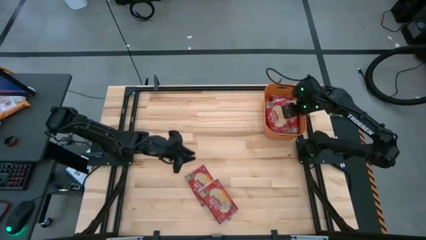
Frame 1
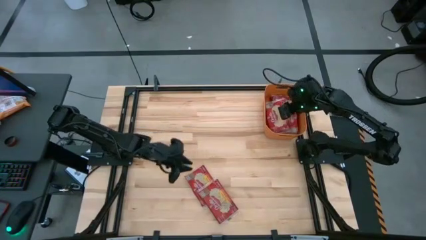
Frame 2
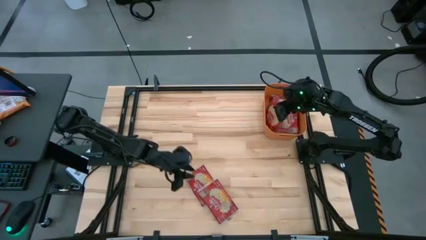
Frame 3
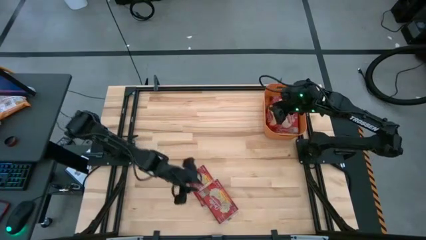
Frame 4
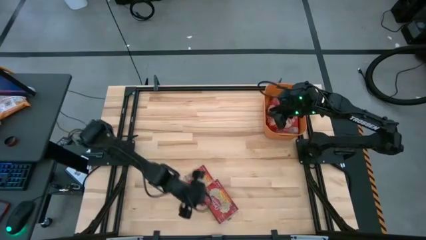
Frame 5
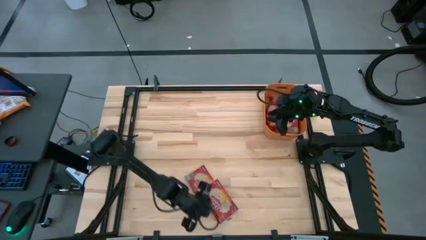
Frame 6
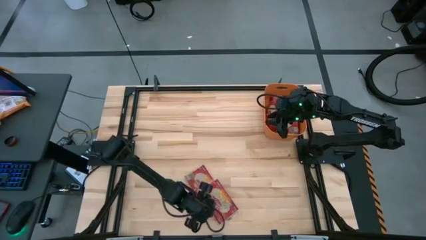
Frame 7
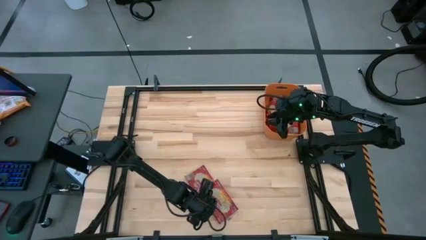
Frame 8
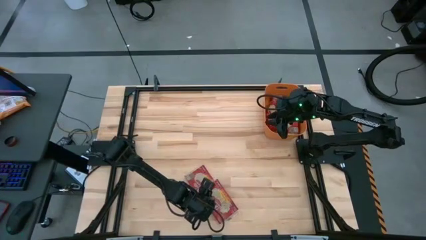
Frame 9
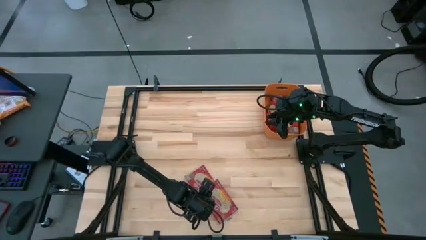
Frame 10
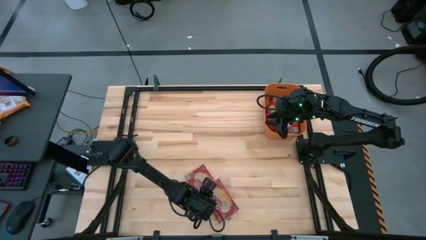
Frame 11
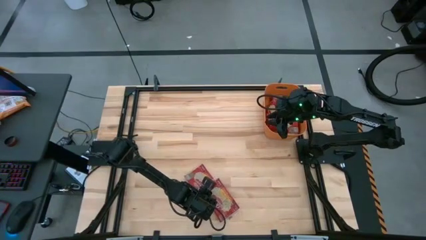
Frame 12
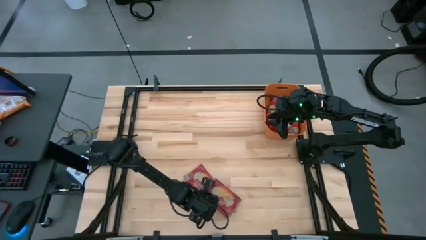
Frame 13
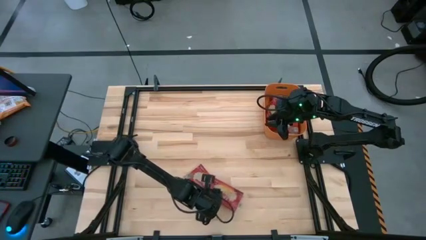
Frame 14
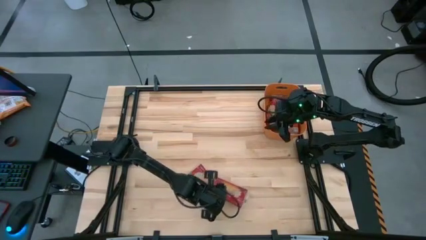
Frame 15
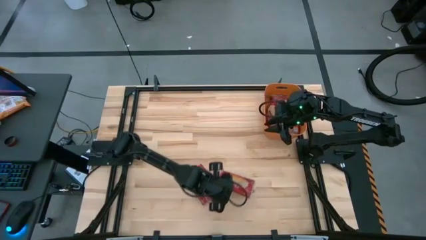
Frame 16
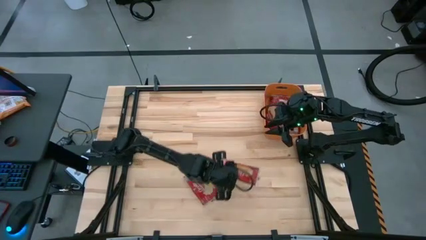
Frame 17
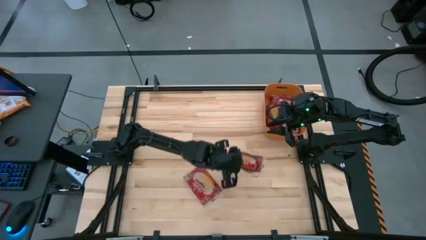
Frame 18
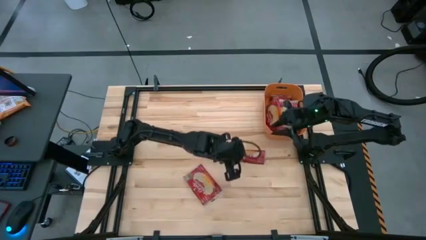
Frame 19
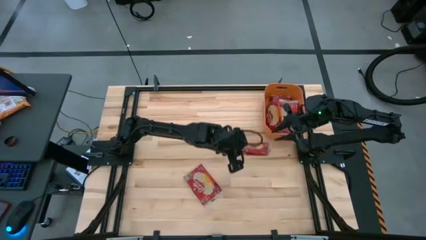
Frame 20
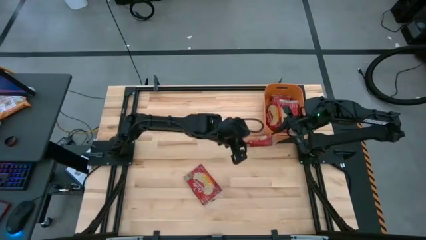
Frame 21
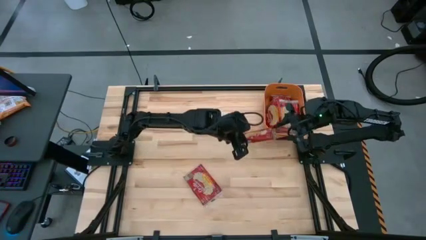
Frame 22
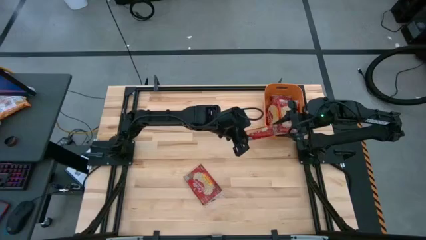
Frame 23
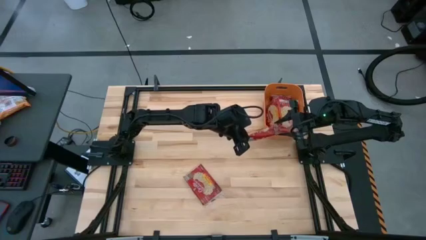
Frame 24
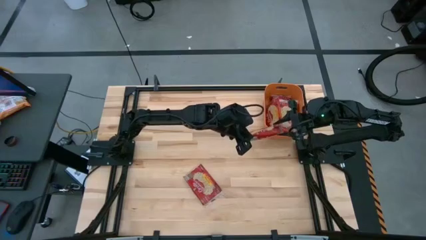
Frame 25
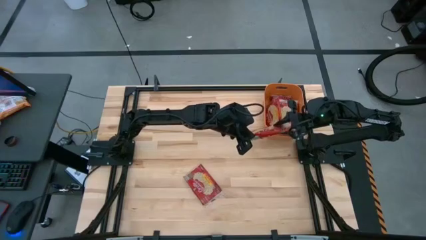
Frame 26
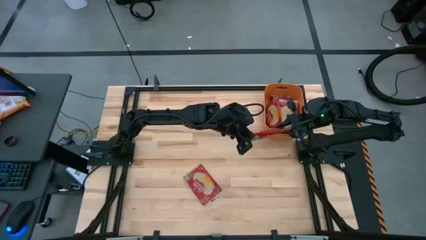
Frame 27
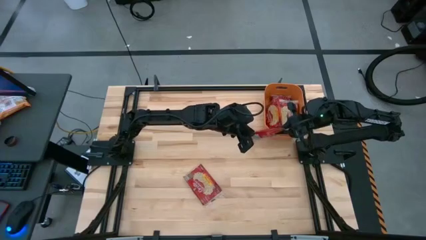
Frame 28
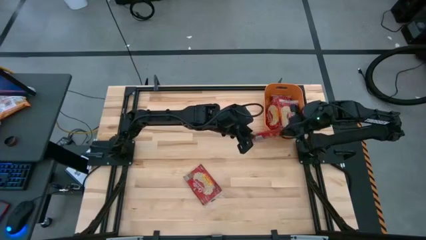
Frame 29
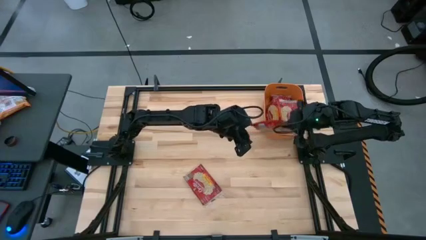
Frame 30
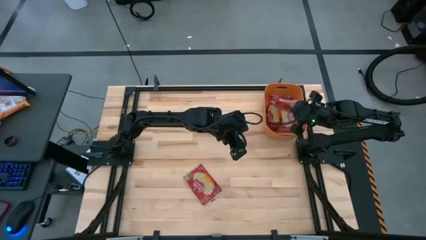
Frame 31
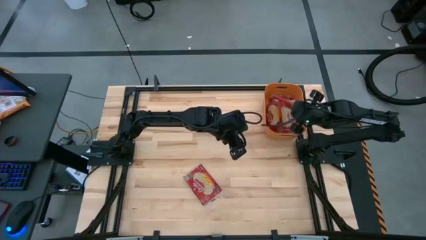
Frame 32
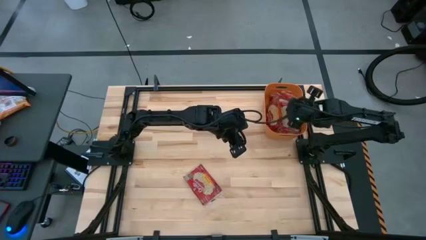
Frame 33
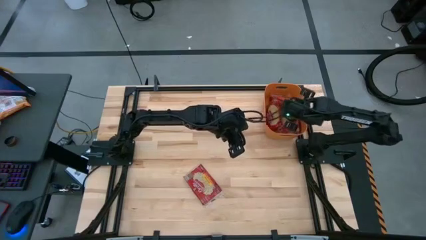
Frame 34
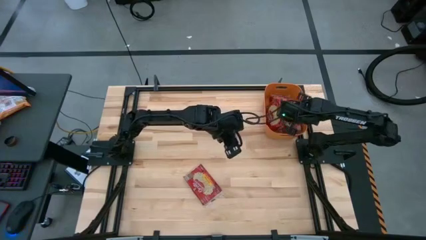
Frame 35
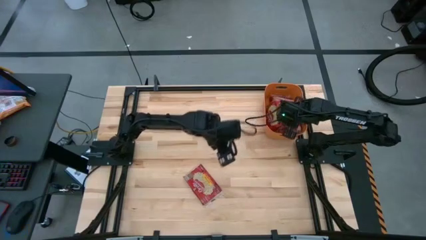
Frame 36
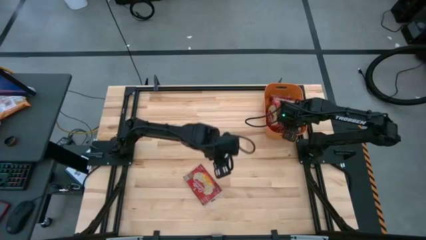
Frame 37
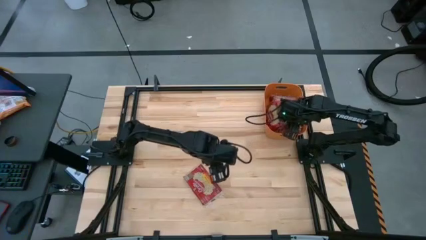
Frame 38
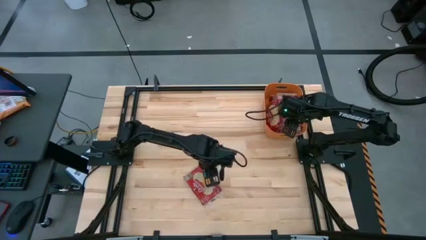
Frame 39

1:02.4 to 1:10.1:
Task: Sort popcorn bags into baskets
Stack the red popcorn on the orange bin

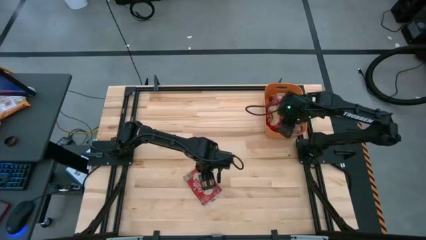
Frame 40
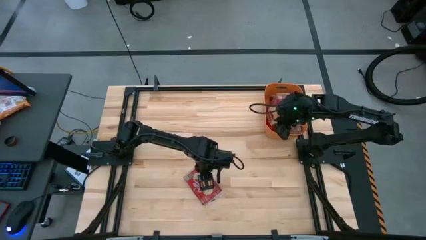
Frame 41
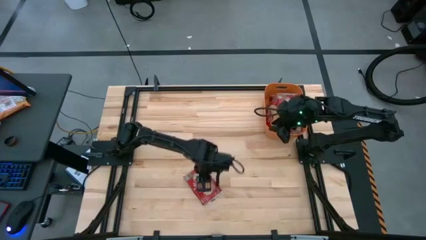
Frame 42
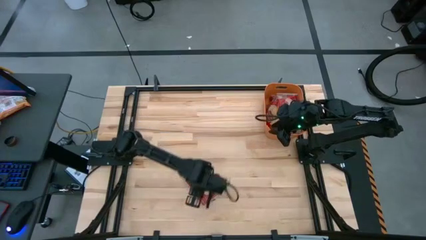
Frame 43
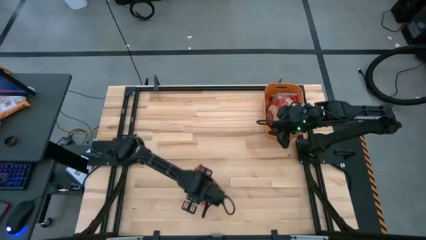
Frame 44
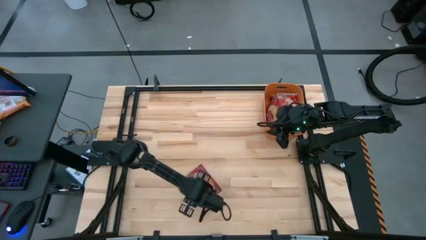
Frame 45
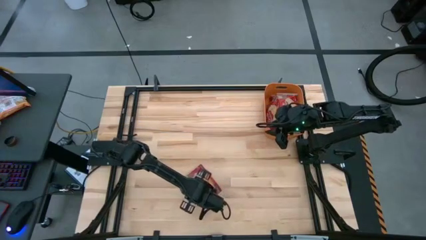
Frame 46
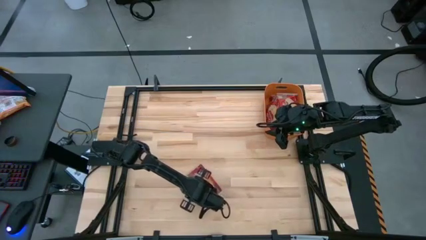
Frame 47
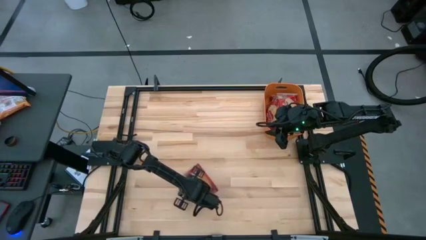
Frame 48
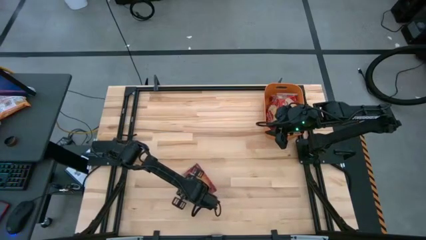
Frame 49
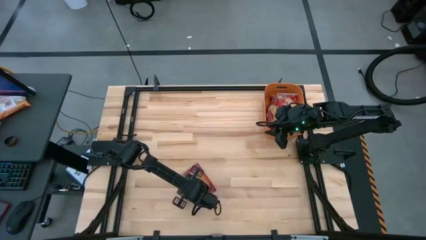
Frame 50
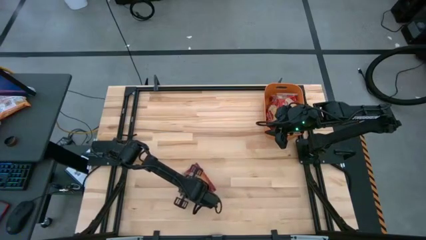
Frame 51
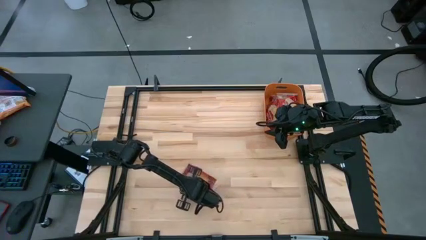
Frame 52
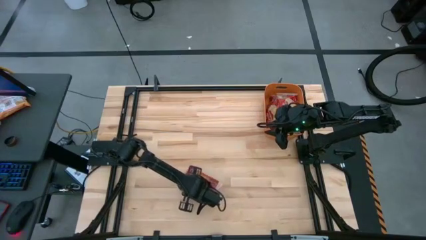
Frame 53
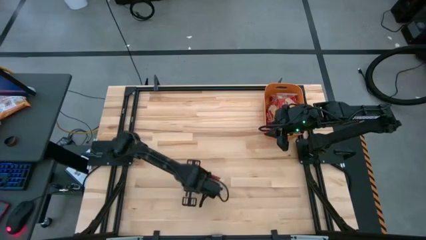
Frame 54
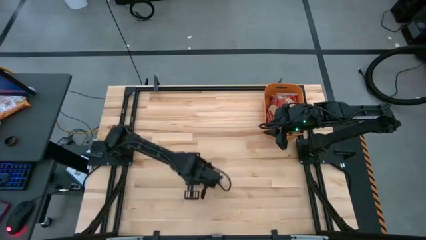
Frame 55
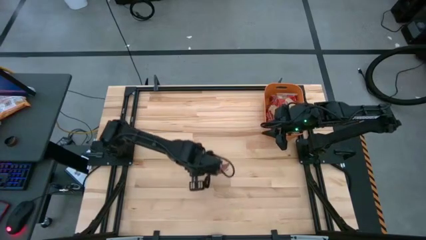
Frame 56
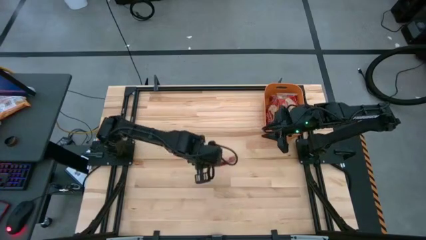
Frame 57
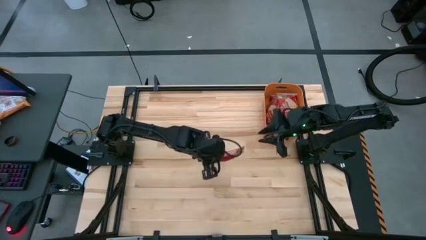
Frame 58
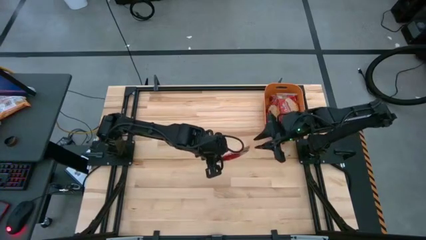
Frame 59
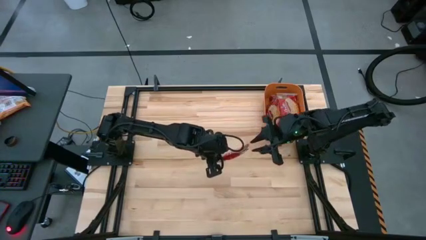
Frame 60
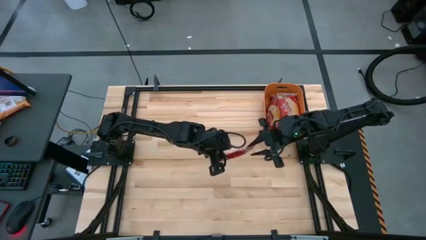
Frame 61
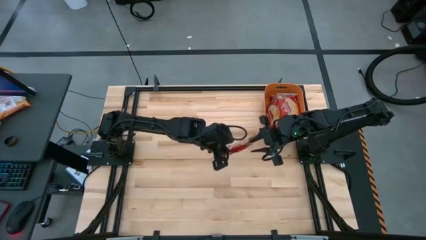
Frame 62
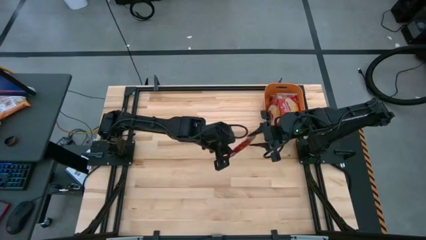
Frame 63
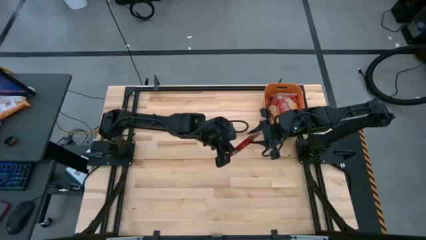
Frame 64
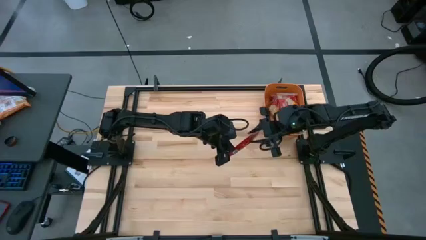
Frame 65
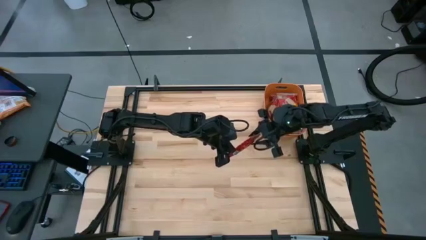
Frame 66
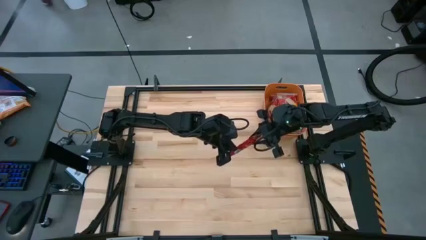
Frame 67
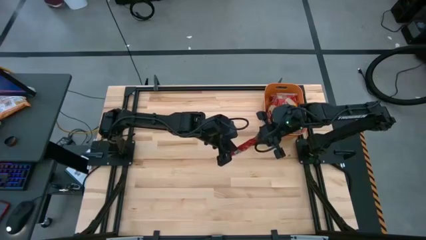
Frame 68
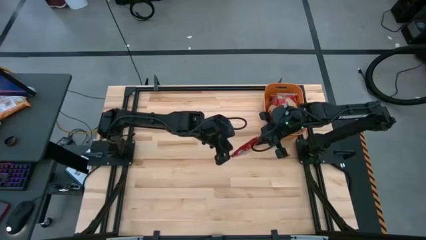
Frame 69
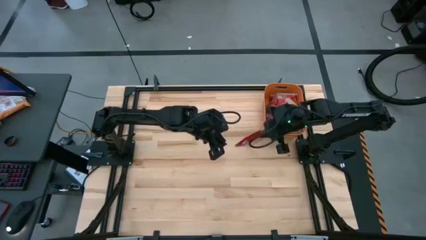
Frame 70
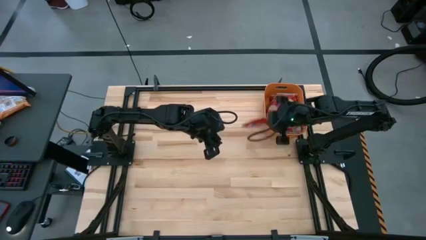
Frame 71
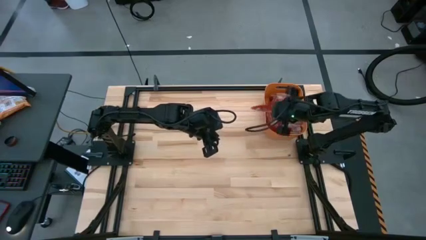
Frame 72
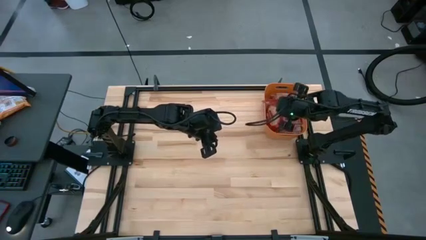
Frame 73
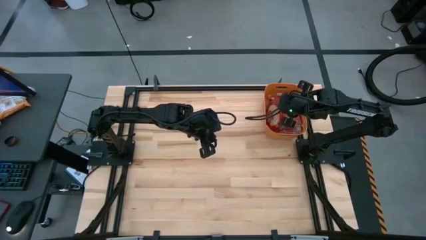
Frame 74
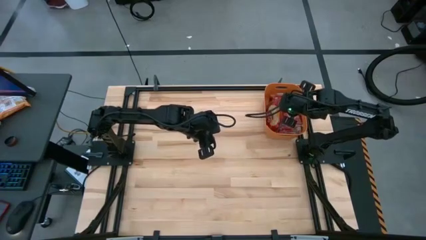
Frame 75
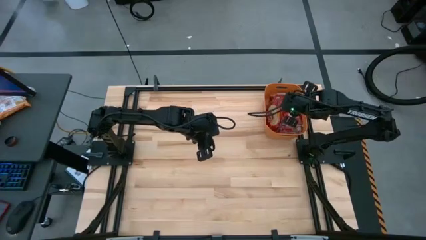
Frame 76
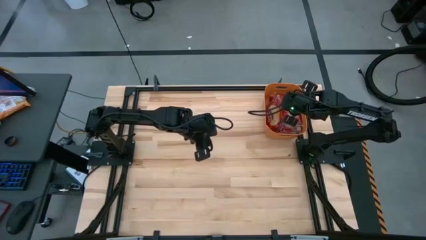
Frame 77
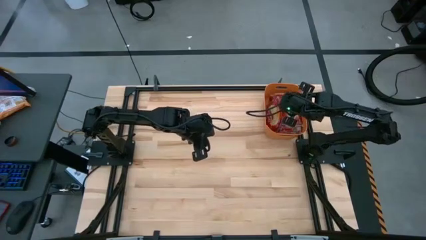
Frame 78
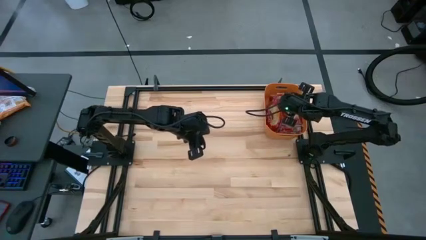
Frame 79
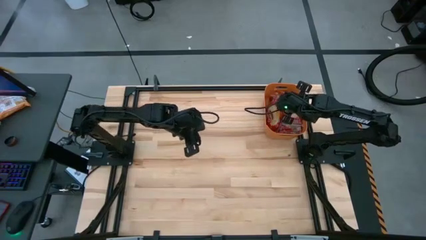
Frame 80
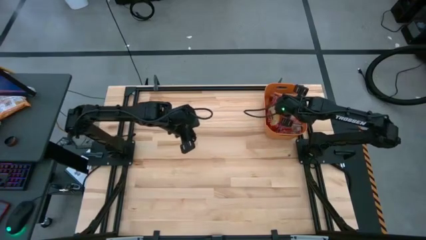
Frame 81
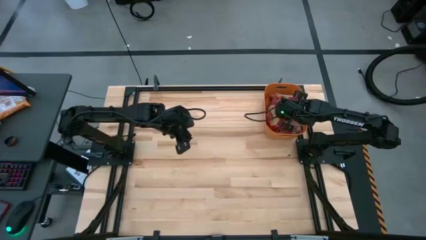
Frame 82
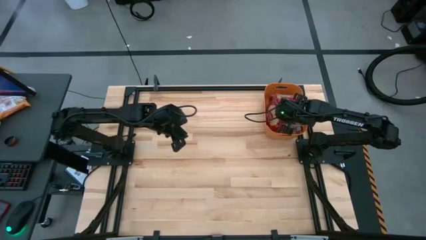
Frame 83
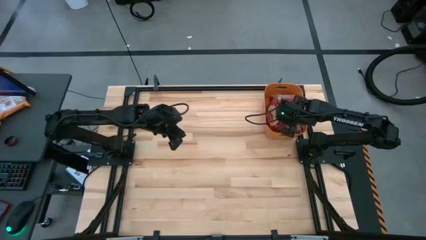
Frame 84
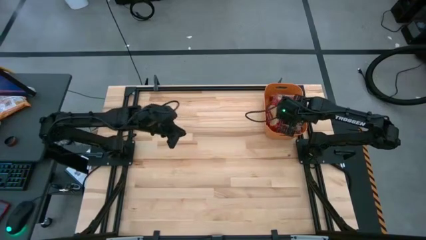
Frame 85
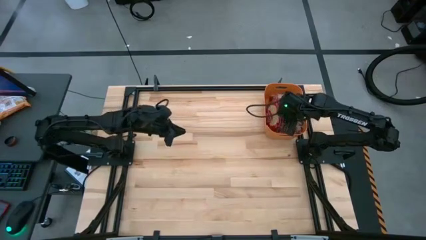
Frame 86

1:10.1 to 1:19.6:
Stack the red popcorn on the orange bin
